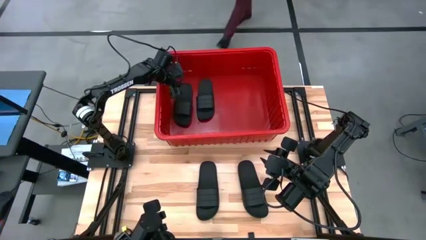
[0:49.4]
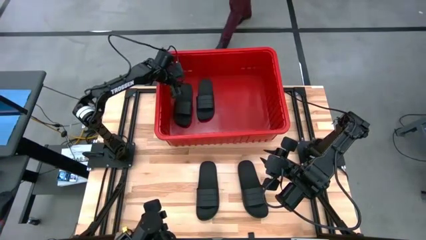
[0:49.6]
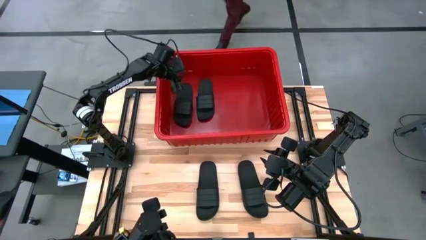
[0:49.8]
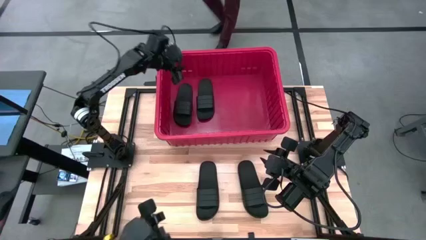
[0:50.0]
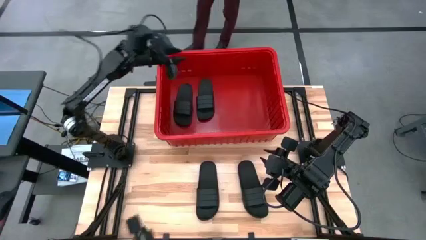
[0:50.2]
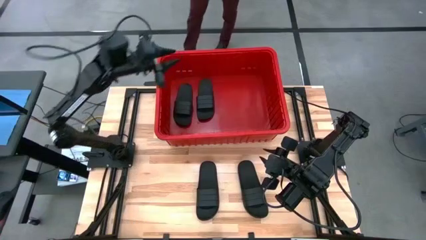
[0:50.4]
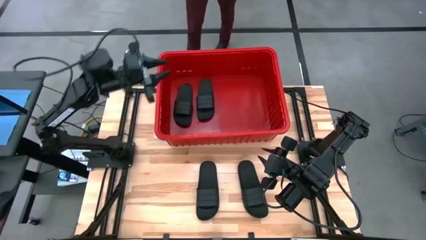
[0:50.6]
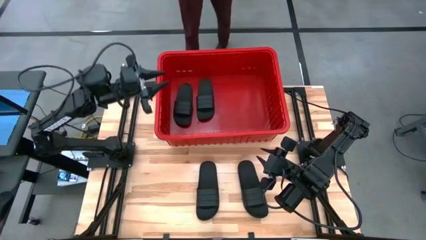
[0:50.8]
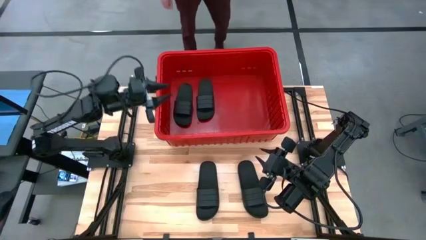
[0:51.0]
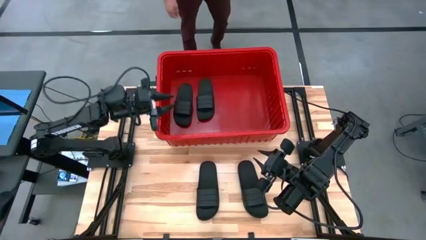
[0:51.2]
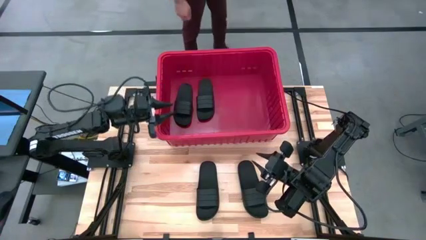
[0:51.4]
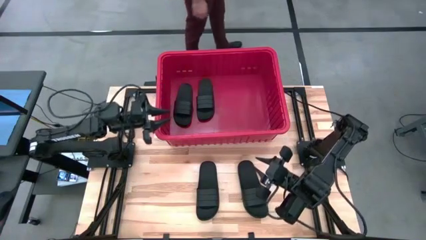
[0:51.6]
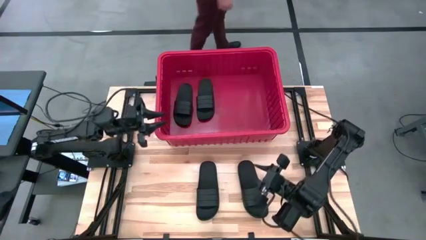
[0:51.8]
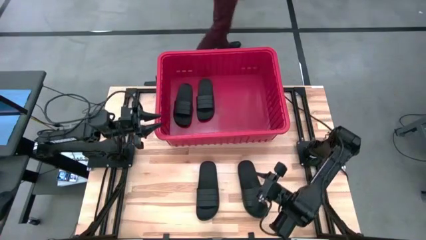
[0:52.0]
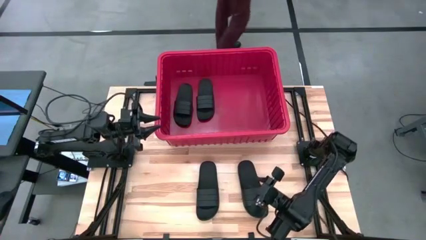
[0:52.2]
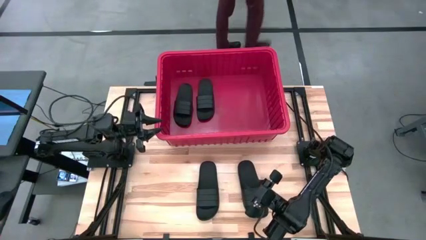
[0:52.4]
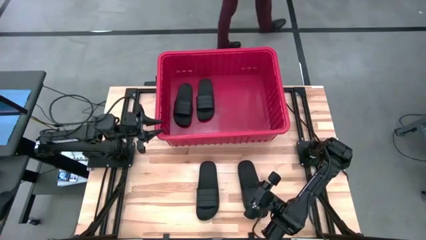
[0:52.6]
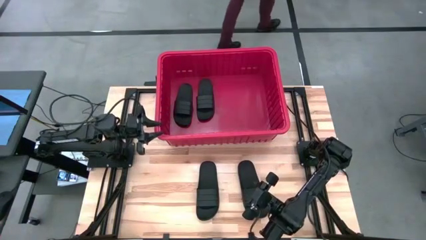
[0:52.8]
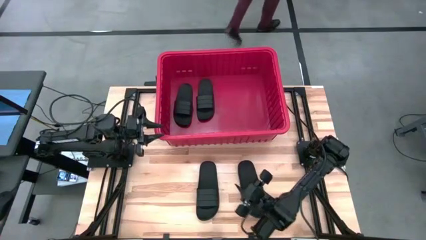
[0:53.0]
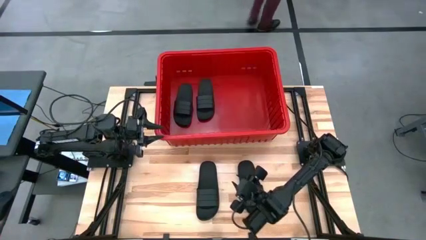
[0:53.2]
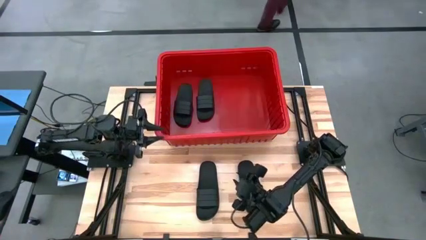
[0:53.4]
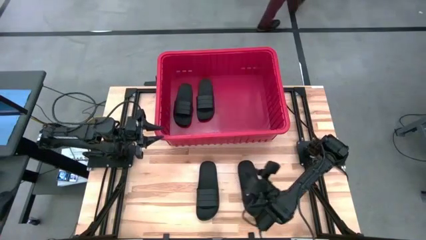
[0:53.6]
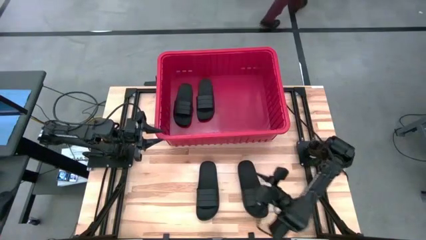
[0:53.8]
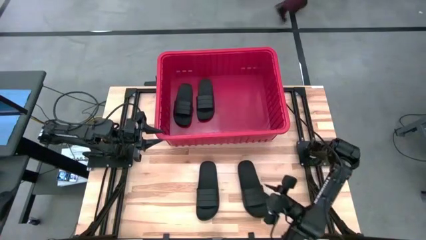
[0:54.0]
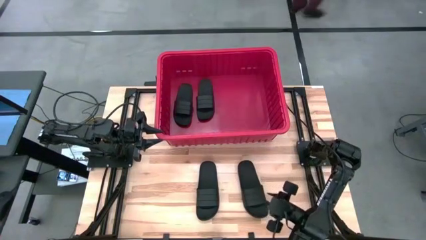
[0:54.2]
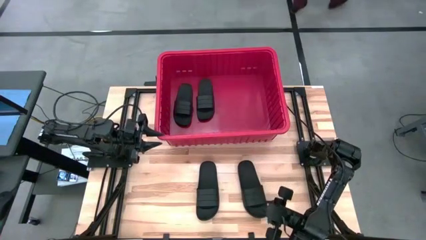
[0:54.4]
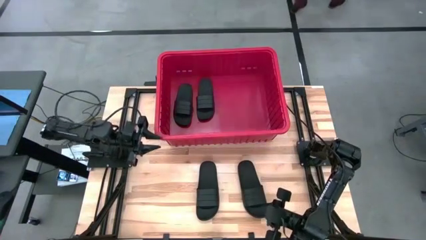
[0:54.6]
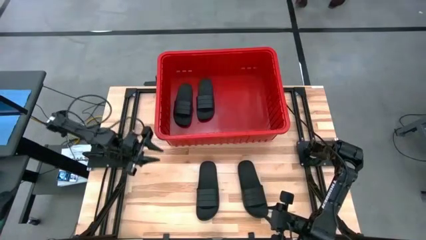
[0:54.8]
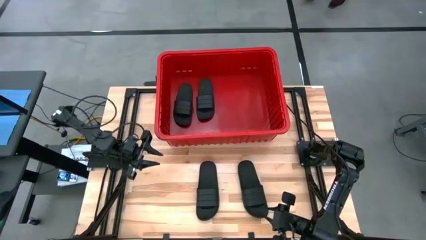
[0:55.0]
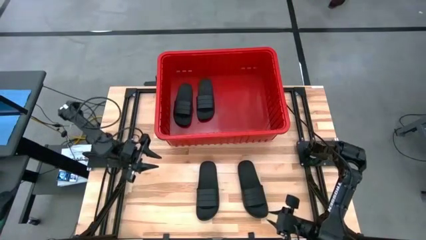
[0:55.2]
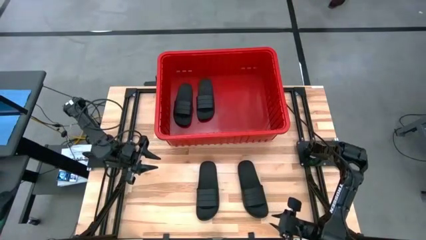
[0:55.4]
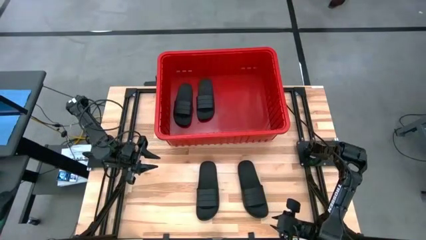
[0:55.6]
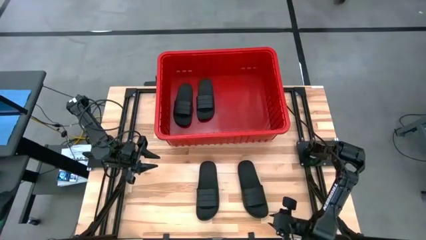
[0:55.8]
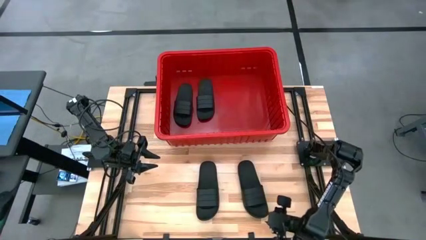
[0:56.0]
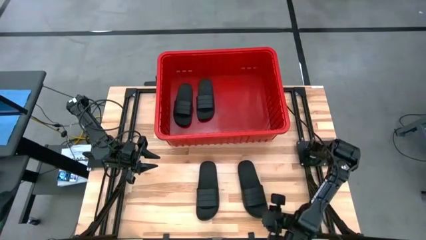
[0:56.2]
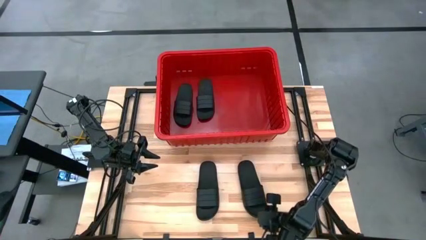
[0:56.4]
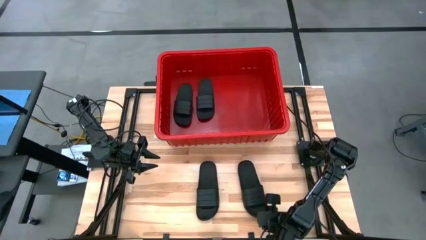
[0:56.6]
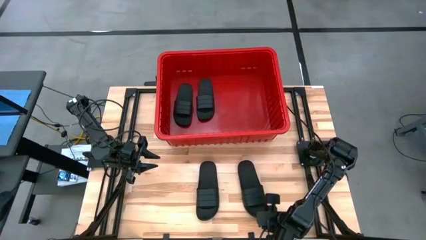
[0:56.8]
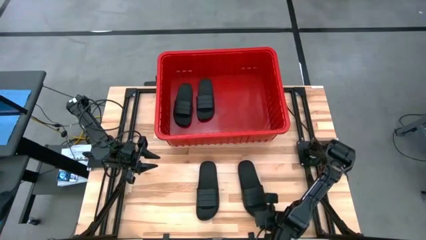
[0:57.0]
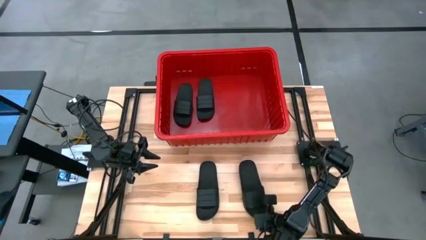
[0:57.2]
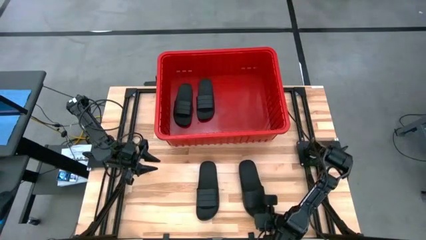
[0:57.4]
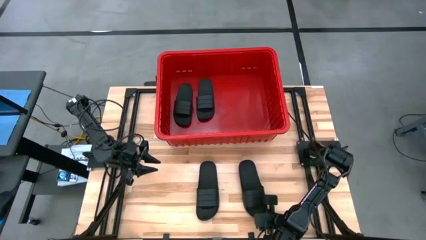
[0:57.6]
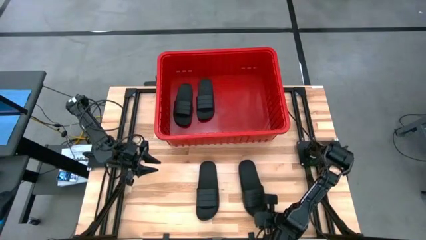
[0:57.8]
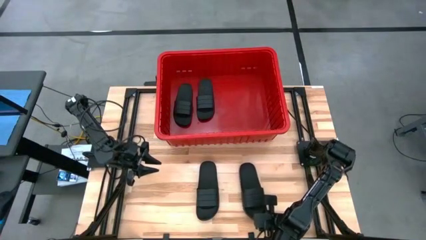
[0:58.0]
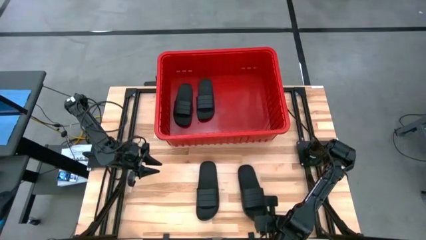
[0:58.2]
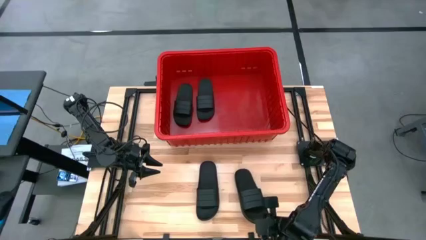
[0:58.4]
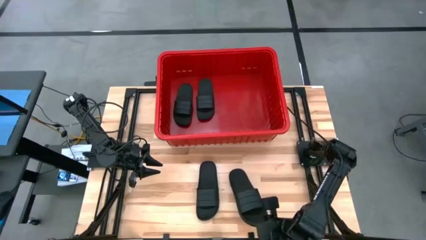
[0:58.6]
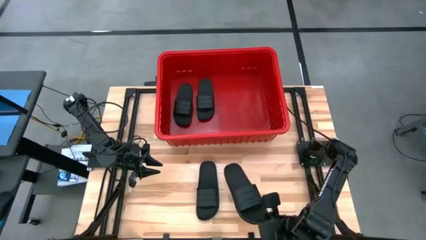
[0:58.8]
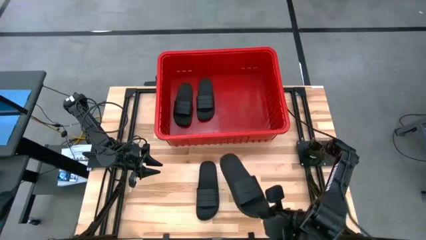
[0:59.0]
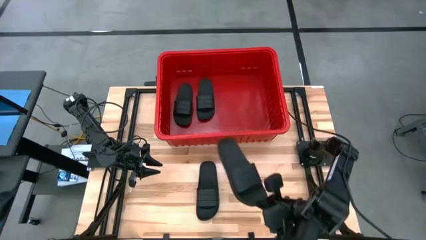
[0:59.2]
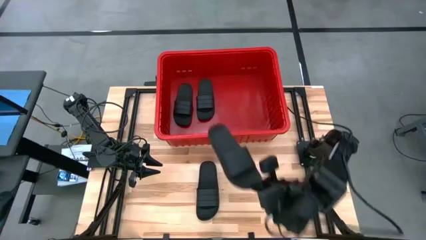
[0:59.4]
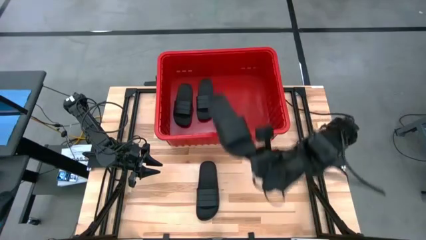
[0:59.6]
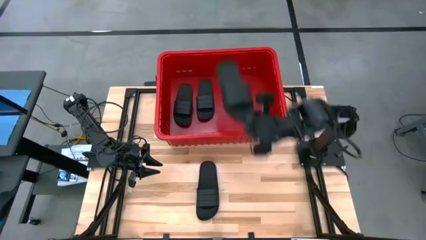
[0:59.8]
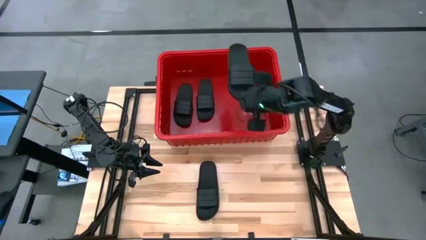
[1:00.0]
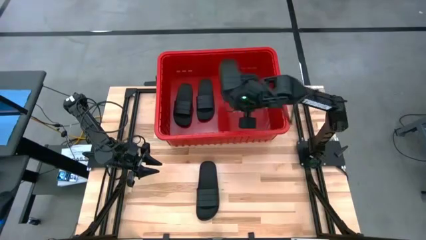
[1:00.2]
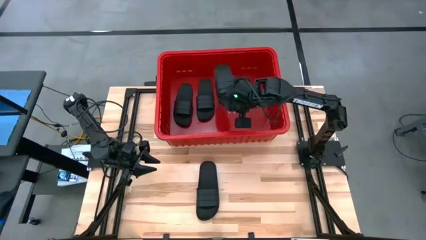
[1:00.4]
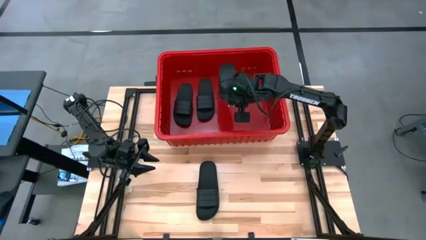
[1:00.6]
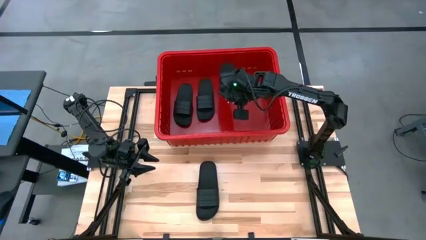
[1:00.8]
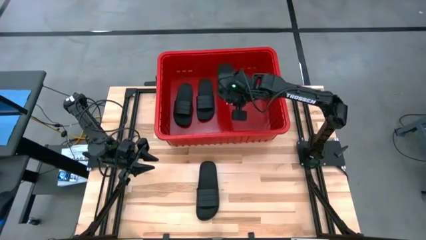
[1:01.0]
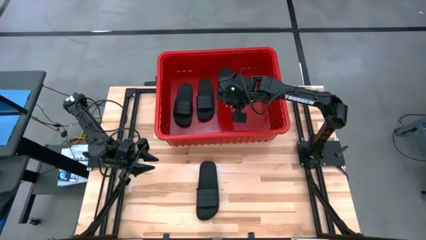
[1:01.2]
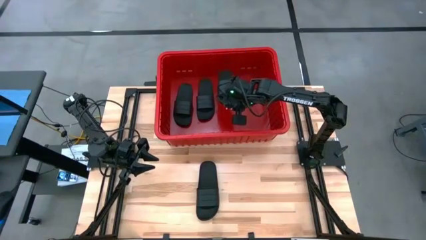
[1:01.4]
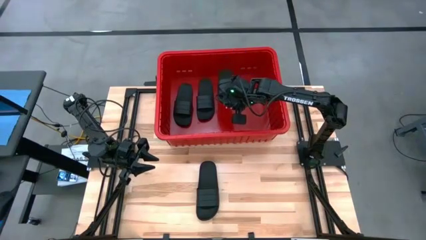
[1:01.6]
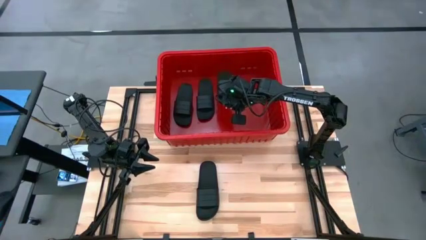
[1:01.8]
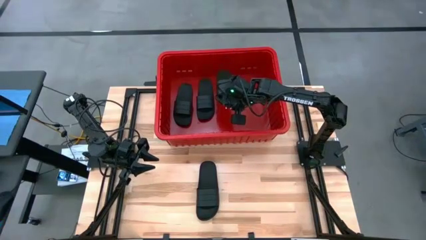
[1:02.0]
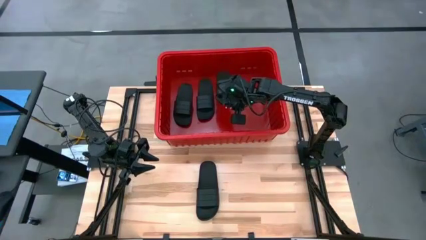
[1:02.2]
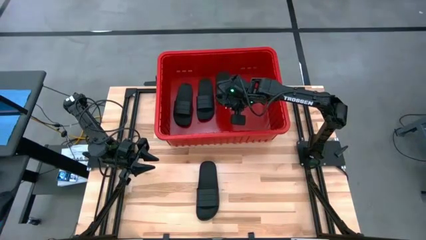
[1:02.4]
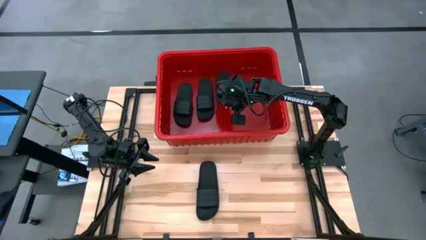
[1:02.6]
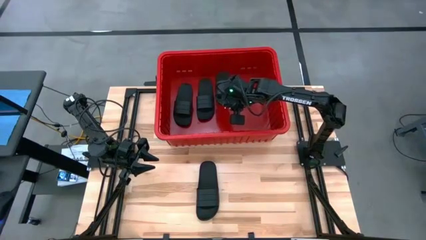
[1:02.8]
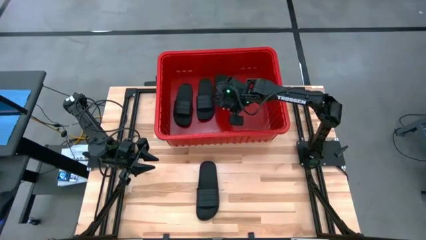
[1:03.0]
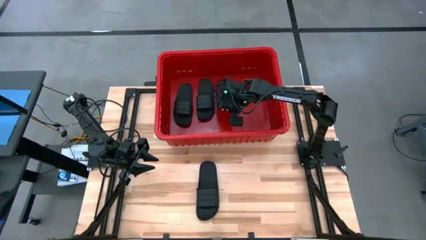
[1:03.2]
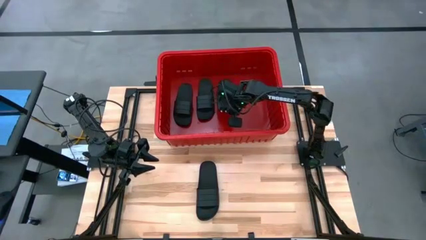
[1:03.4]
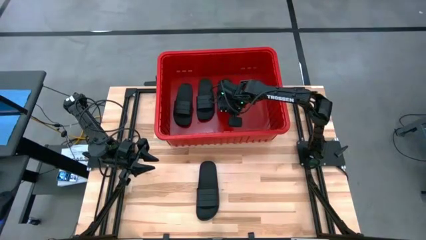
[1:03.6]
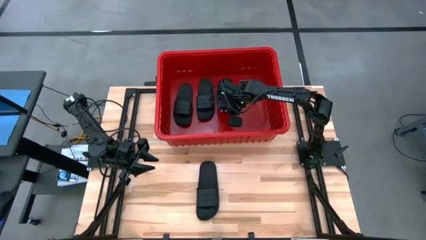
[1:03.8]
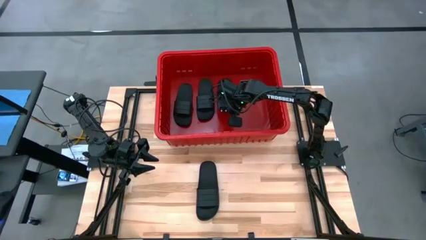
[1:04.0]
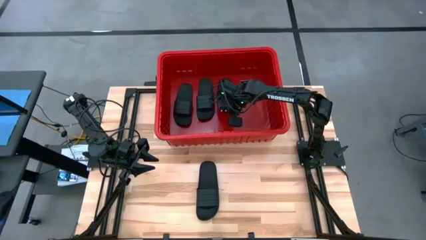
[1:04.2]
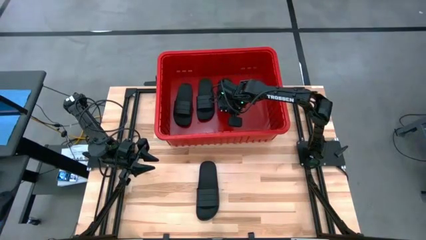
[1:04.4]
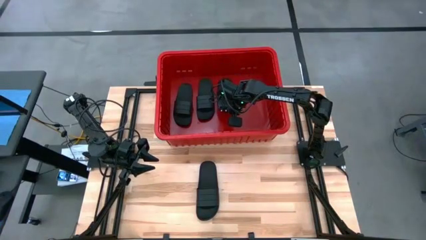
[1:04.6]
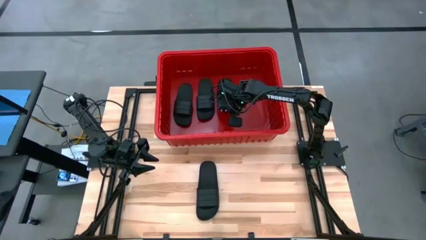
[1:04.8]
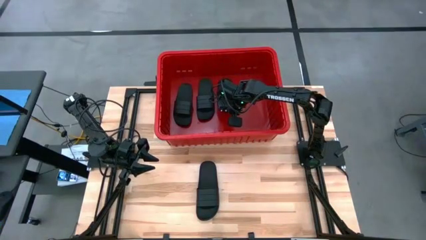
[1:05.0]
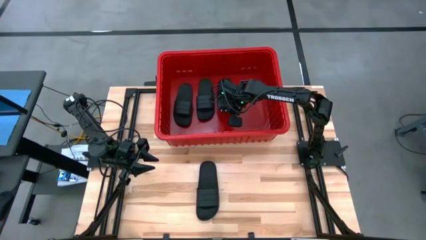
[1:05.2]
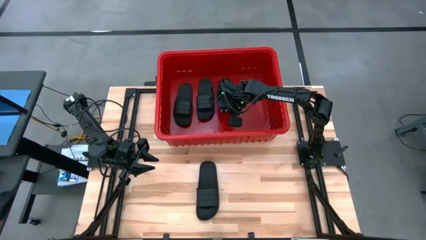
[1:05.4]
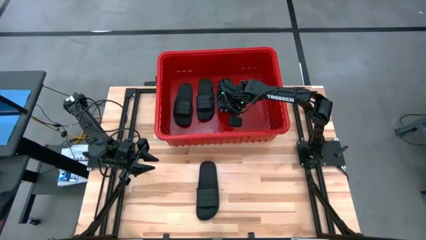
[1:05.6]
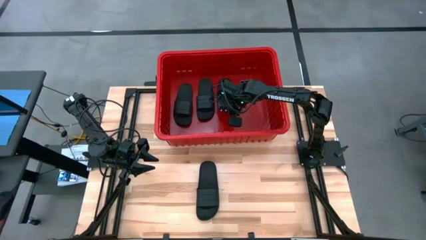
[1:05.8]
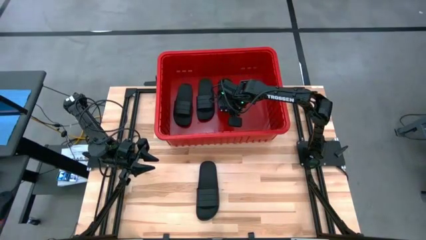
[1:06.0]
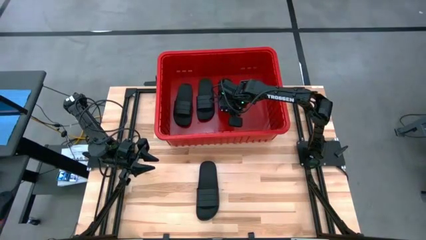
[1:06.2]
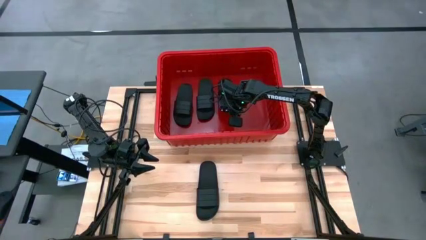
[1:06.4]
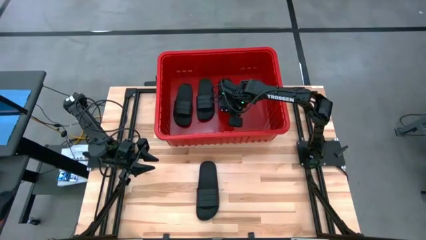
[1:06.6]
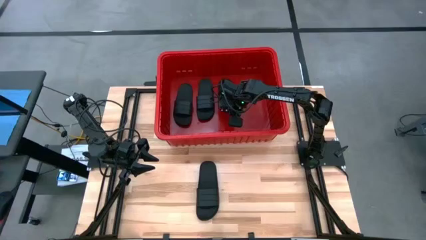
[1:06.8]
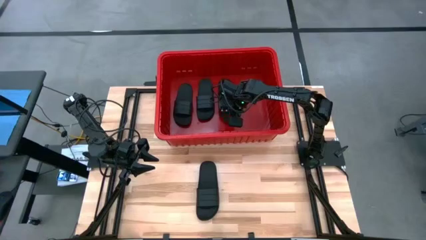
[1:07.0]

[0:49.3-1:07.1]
Task: Pick and place slides into bin
Put the right slide into the bin
